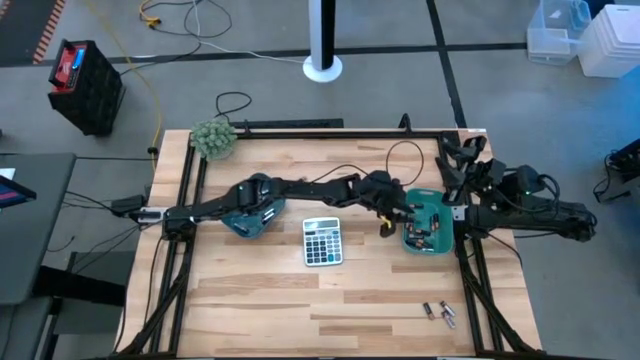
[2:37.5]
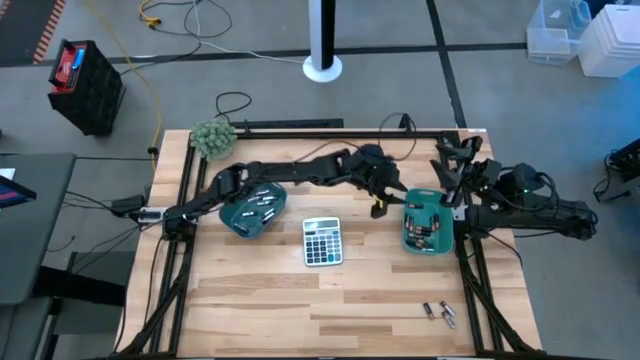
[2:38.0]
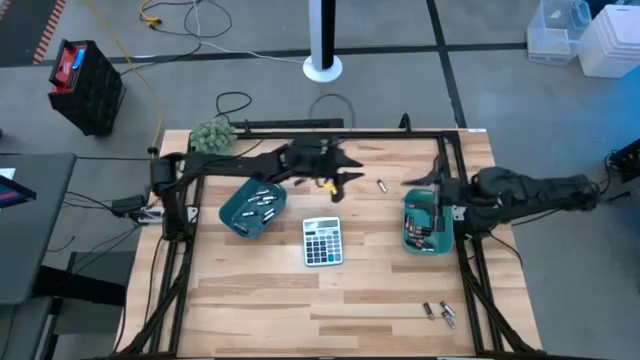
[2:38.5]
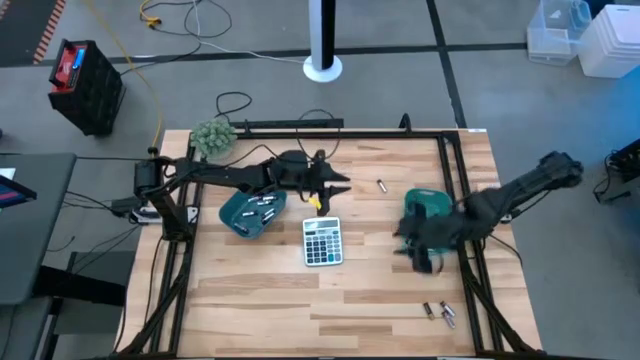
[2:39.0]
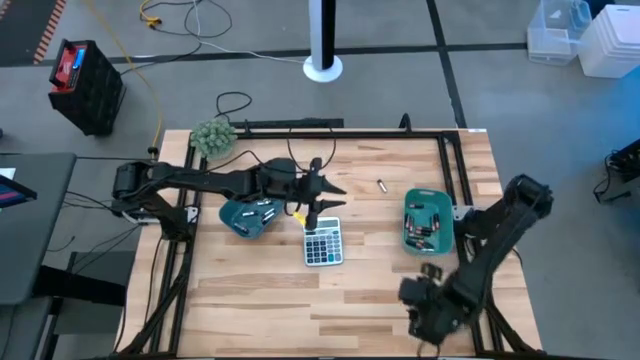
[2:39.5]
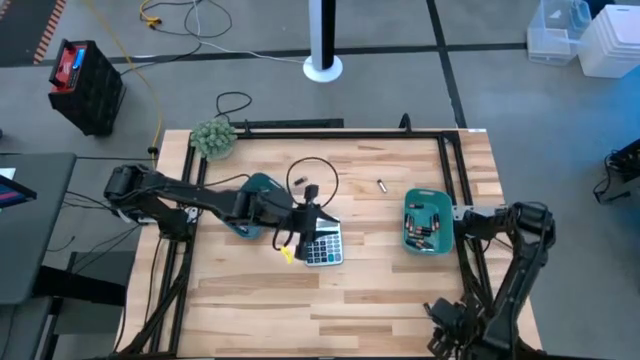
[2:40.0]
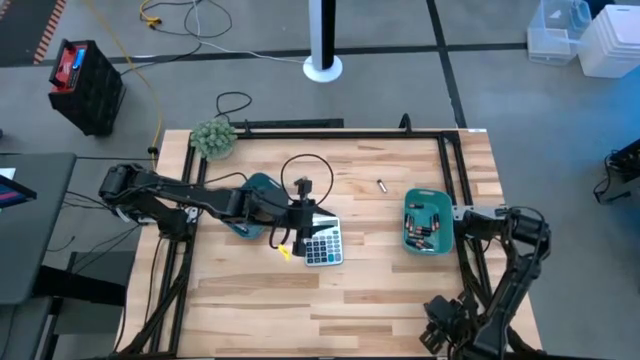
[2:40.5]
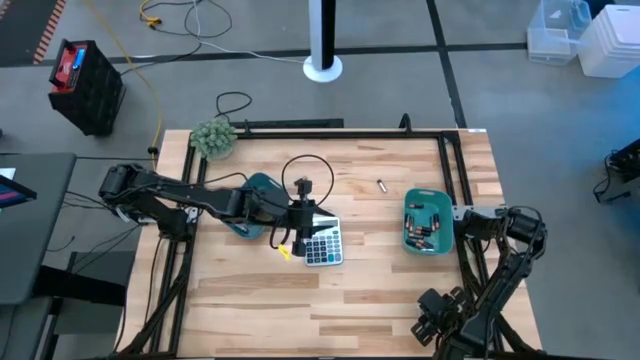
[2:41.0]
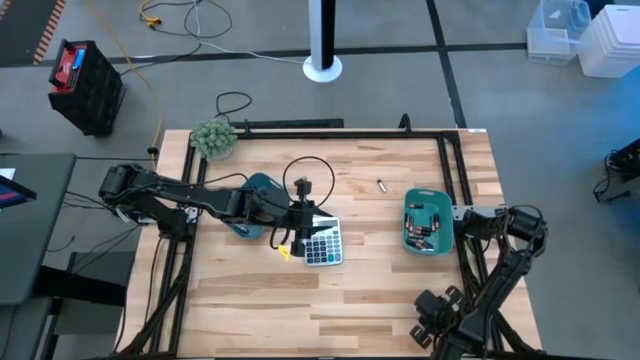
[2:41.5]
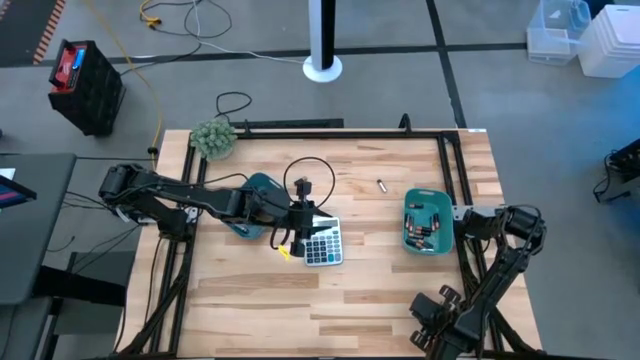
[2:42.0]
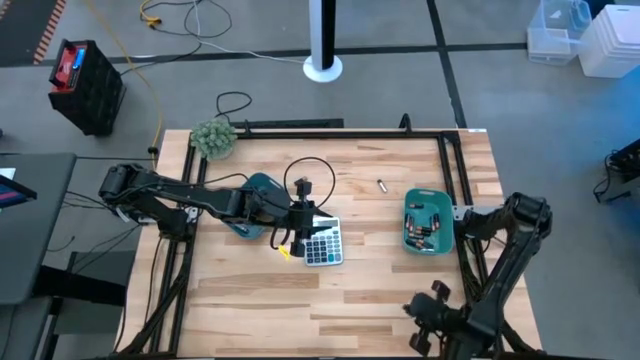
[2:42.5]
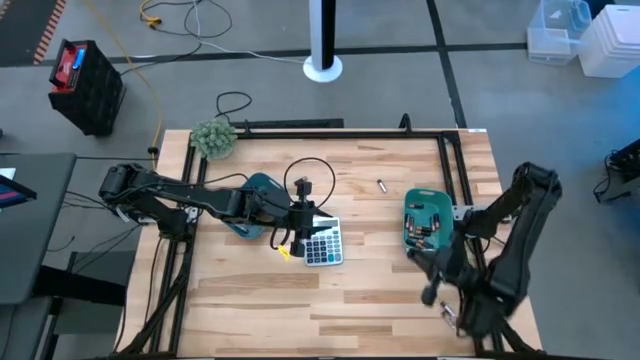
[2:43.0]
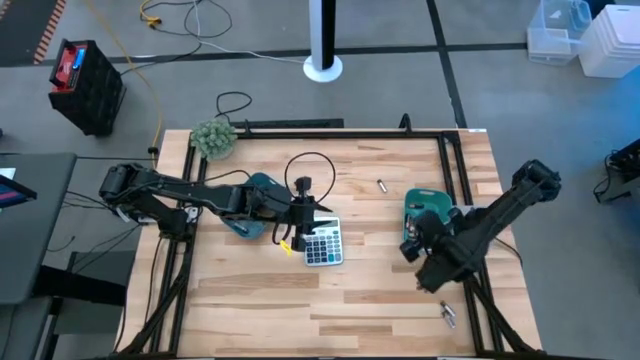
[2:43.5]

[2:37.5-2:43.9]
Task: Sort batteries
Put the brown/black battery into the green bin

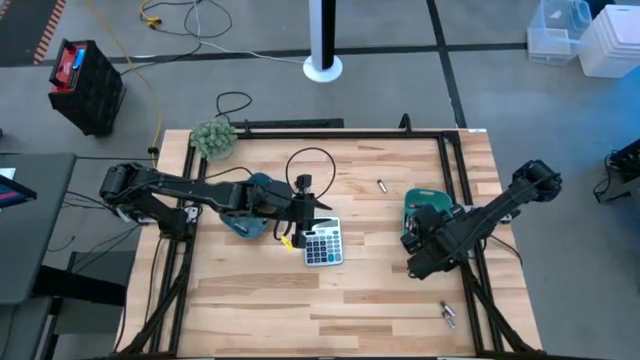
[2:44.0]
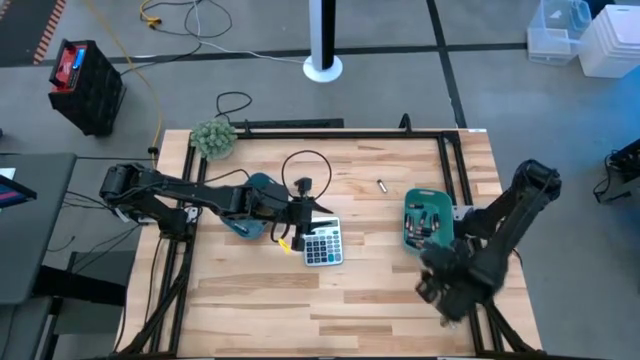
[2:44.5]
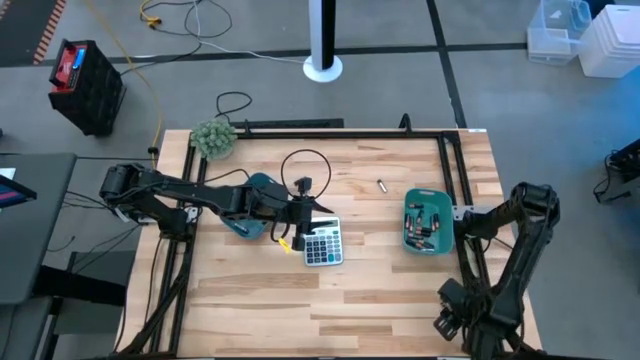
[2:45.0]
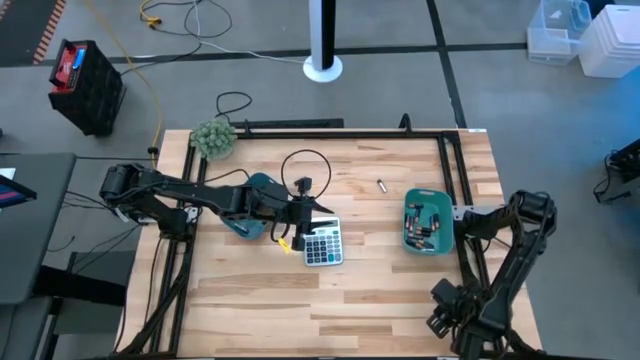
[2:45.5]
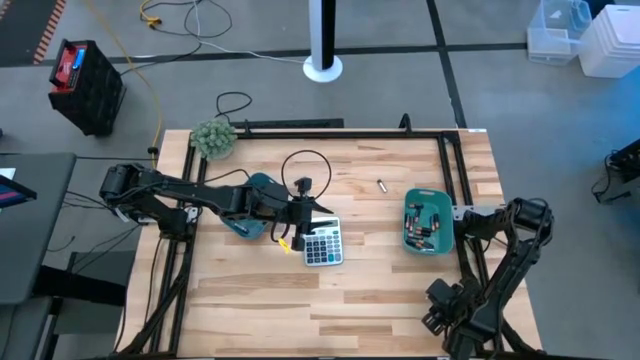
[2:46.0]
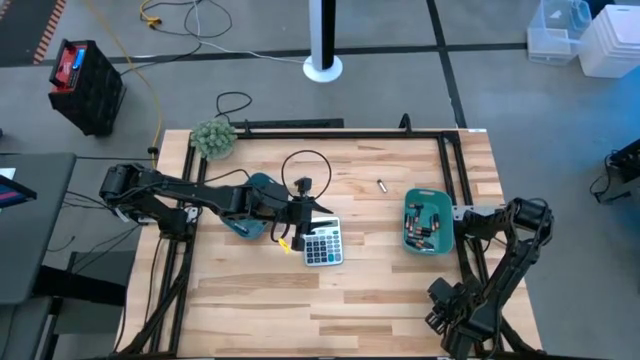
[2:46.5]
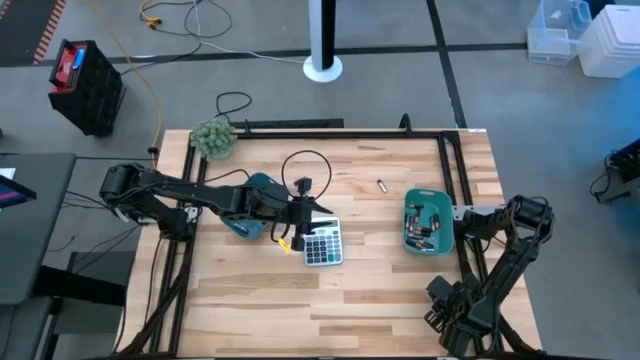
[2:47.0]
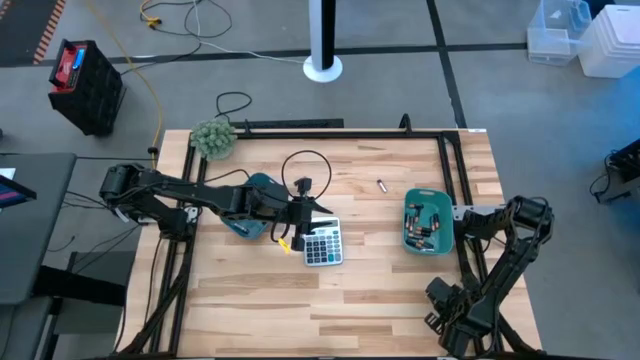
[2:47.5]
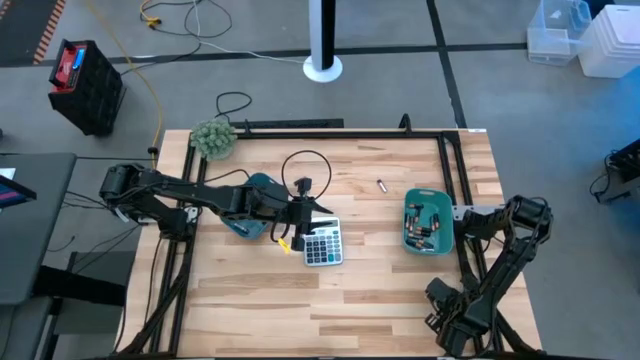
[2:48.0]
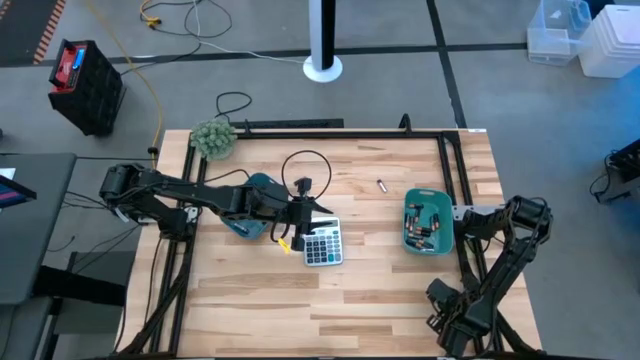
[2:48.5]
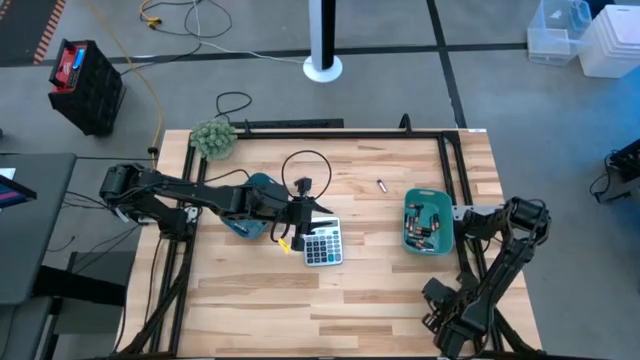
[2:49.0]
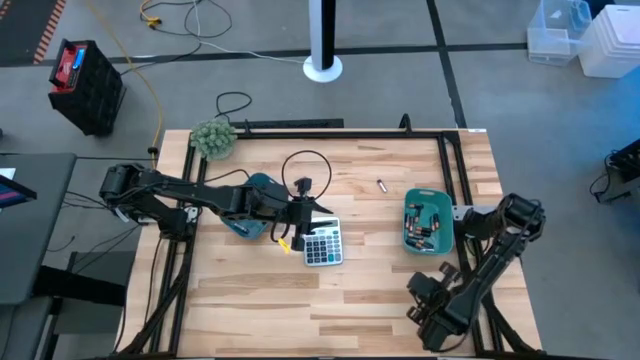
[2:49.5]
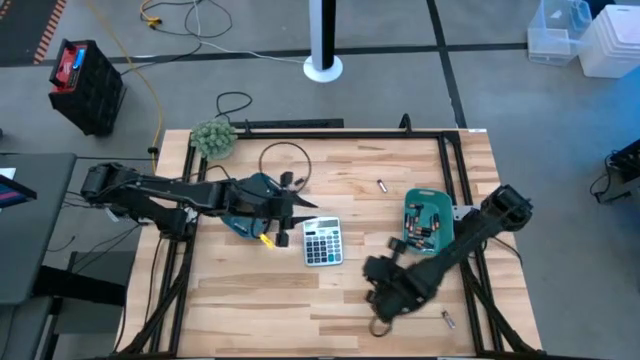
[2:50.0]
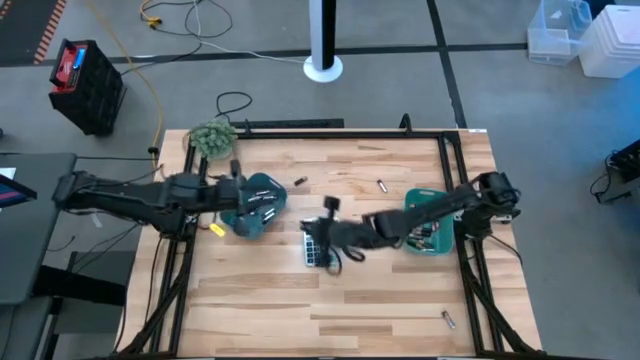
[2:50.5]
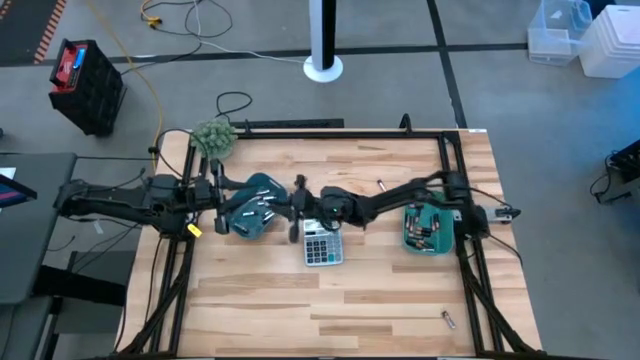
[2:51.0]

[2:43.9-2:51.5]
Put the silver/black battery into the blue bin

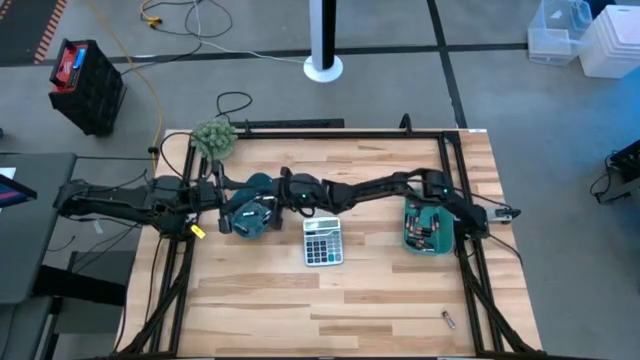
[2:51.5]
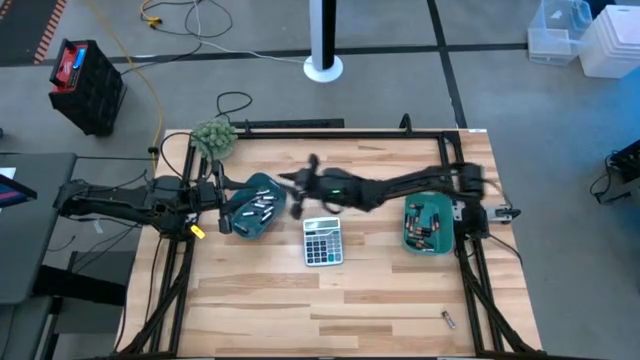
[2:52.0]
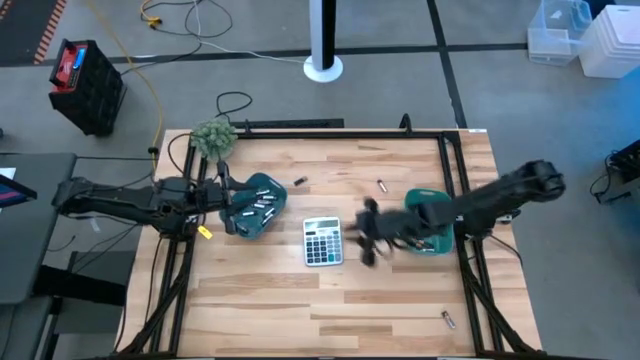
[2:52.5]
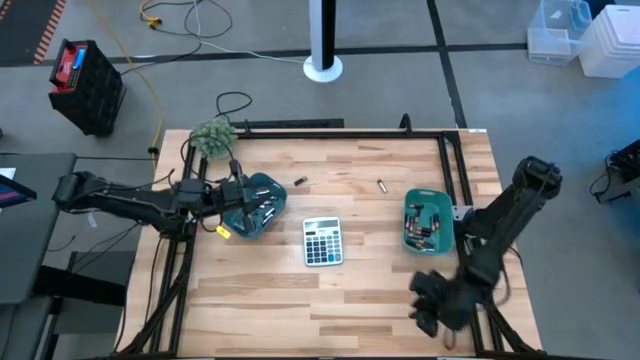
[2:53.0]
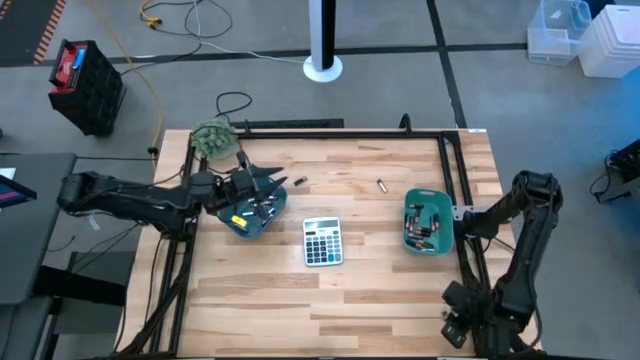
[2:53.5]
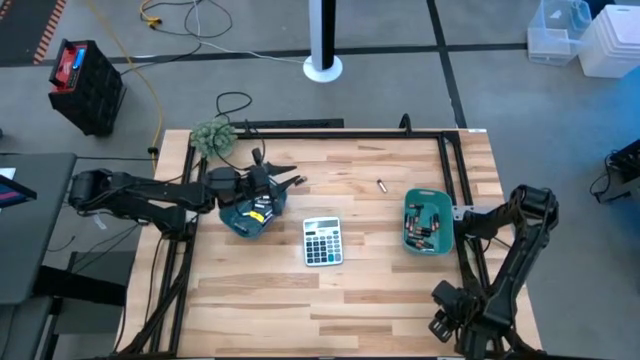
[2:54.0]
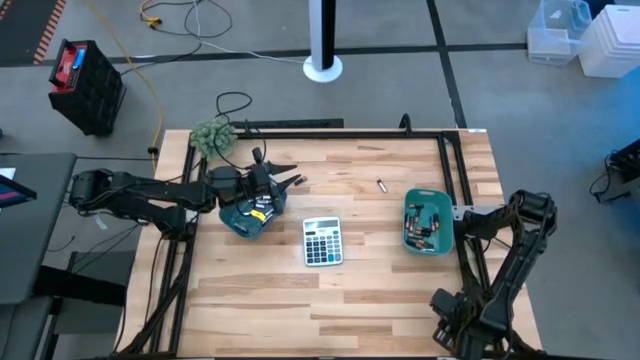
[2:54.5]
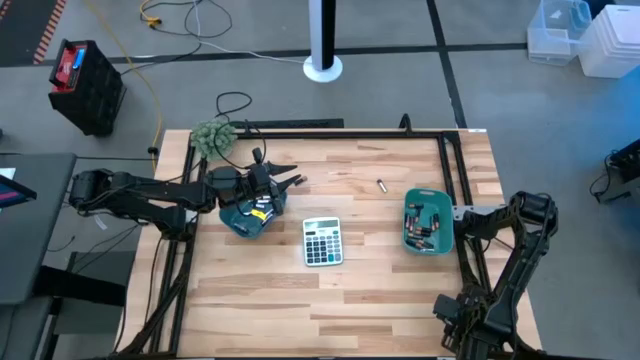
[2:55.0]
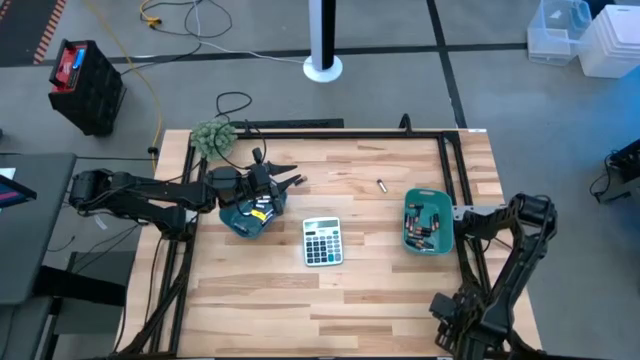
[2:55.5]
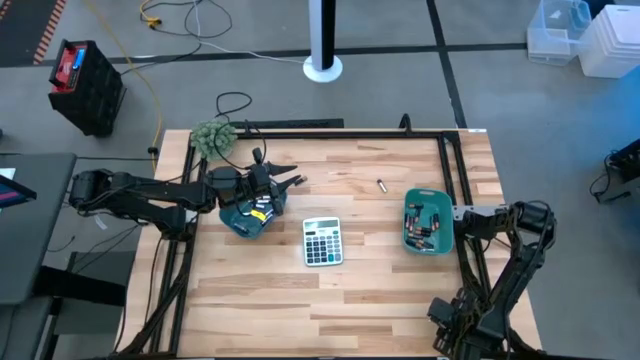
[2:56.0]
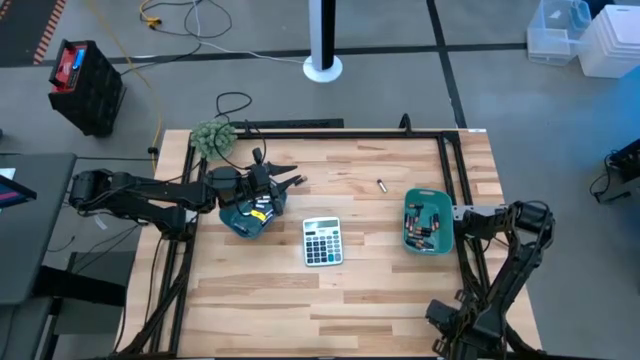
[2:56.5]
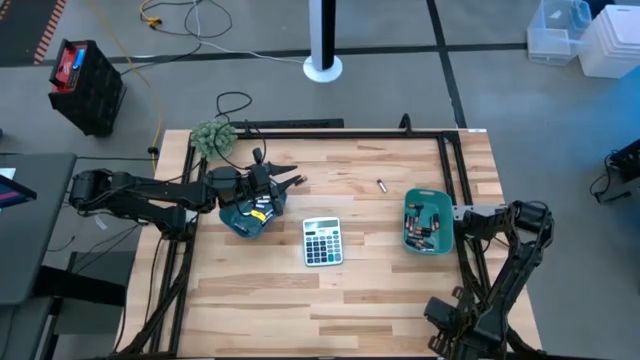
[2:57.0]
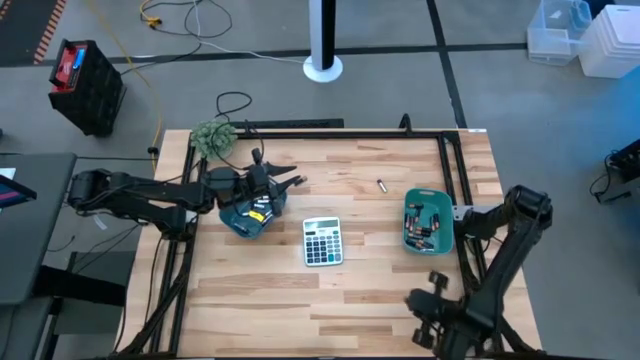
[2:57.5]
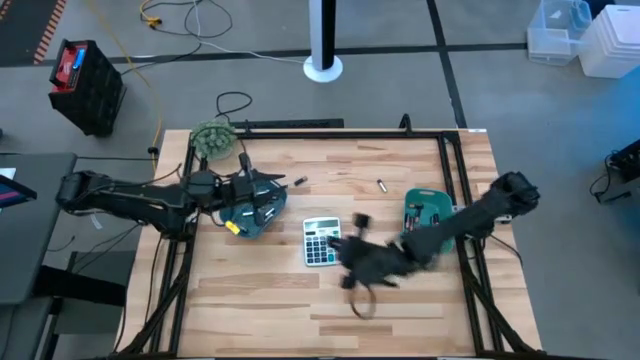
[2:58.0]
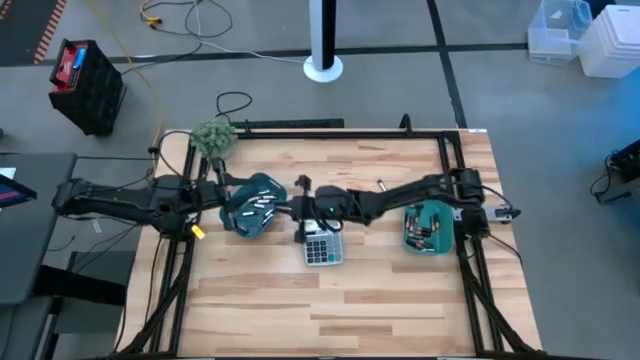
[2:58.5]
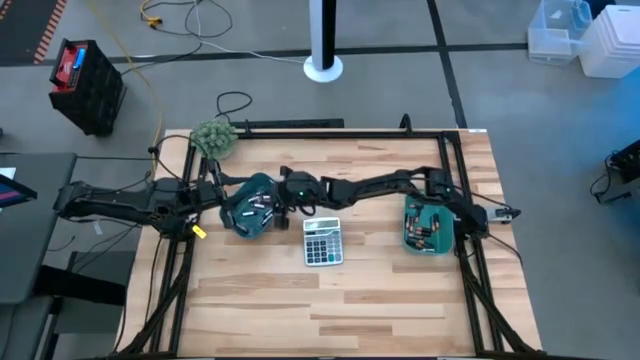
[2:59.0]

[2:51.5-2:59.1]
Put the silver/black battery into the blue bin
